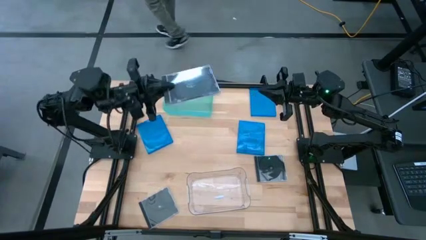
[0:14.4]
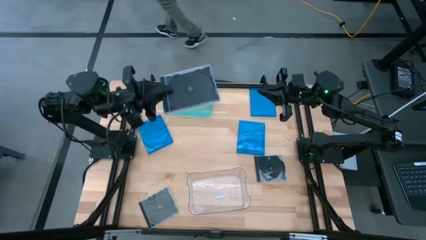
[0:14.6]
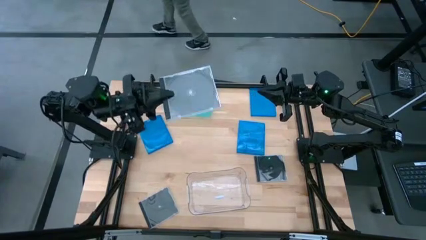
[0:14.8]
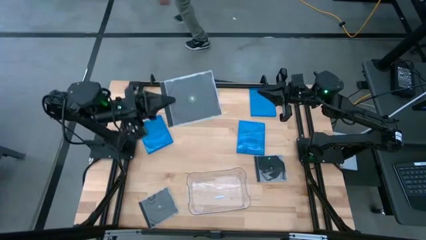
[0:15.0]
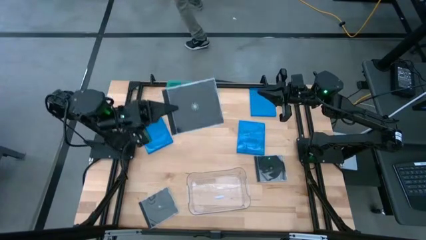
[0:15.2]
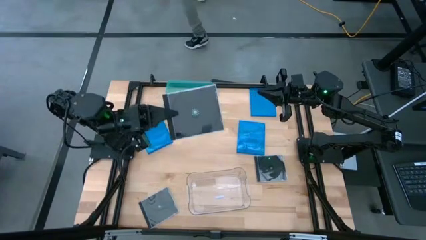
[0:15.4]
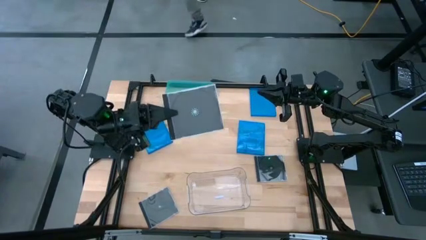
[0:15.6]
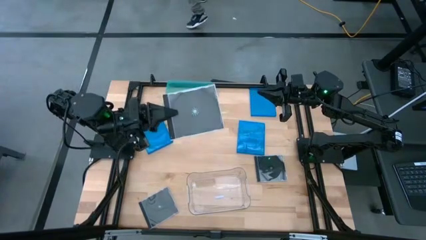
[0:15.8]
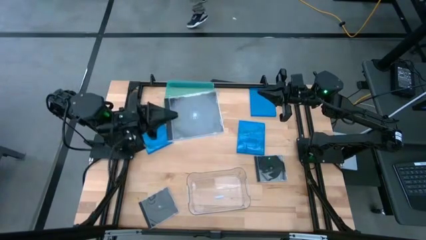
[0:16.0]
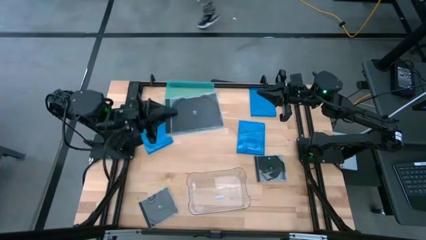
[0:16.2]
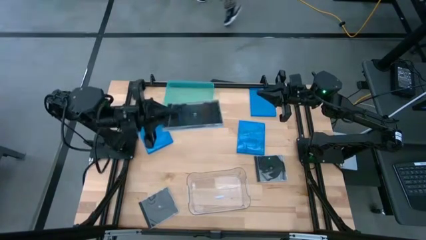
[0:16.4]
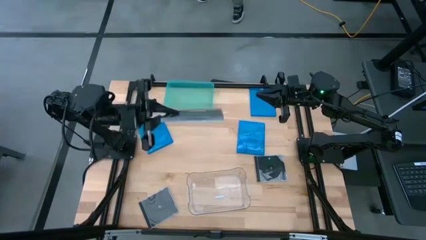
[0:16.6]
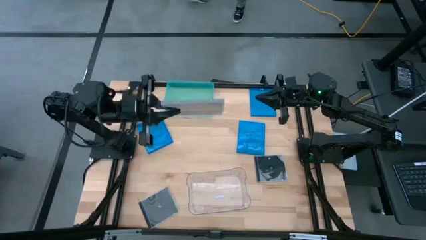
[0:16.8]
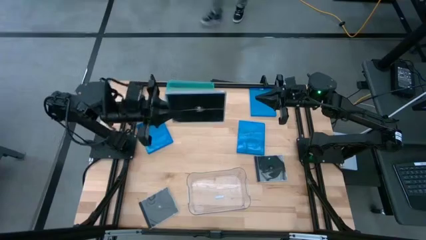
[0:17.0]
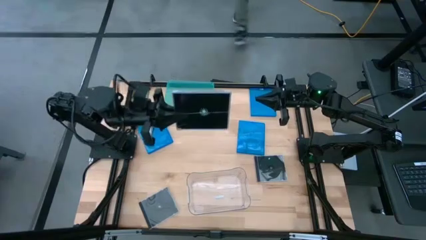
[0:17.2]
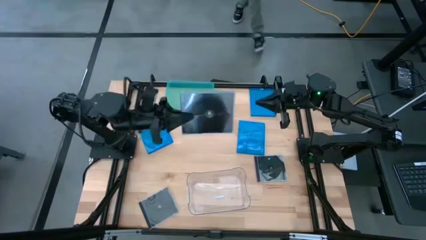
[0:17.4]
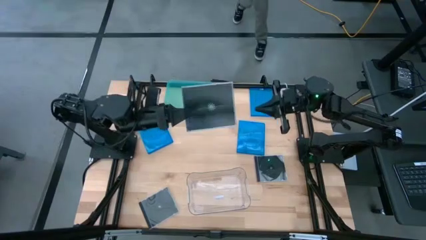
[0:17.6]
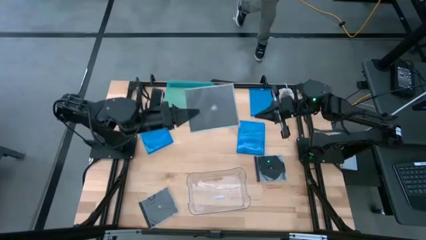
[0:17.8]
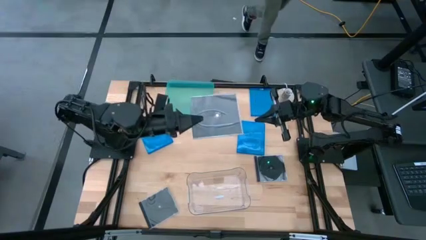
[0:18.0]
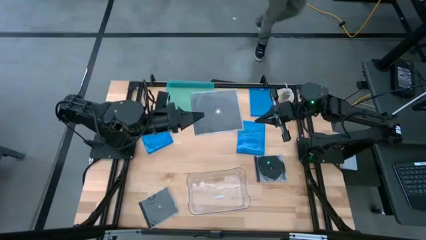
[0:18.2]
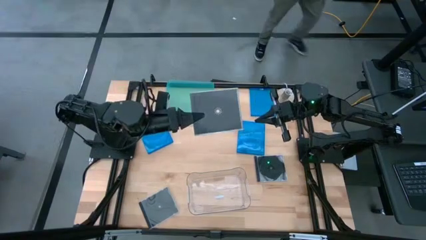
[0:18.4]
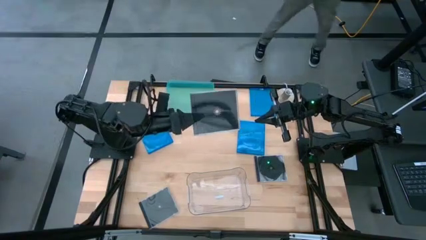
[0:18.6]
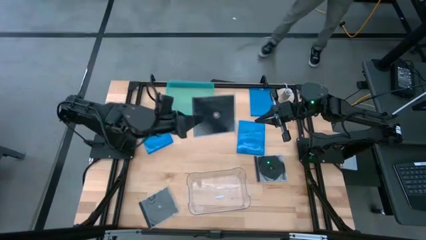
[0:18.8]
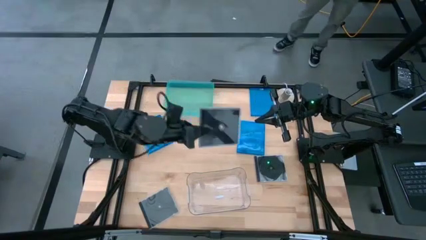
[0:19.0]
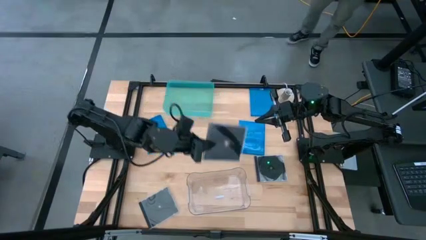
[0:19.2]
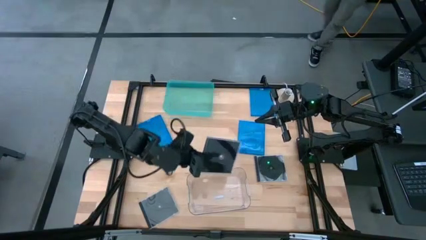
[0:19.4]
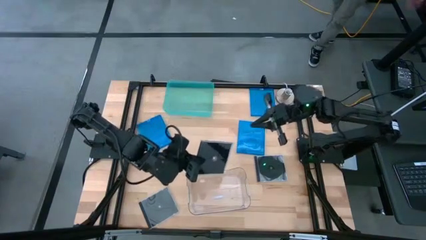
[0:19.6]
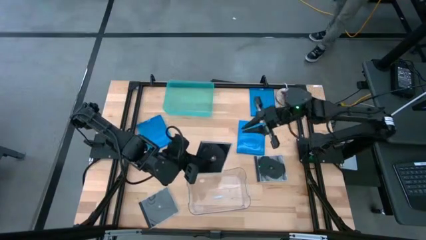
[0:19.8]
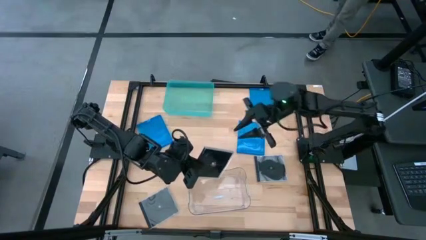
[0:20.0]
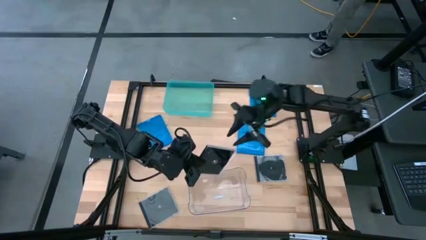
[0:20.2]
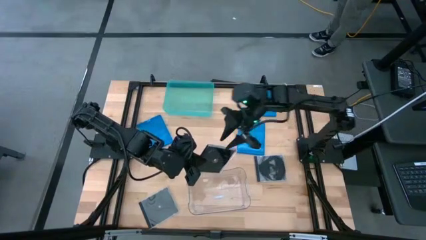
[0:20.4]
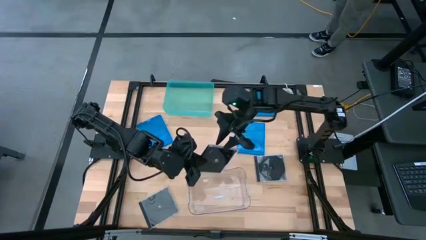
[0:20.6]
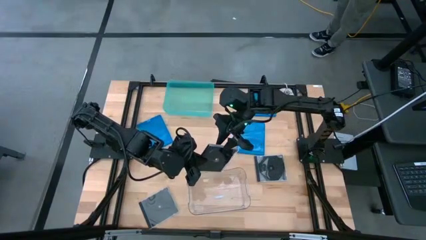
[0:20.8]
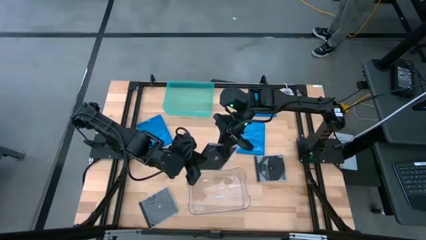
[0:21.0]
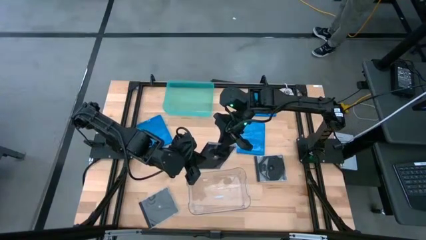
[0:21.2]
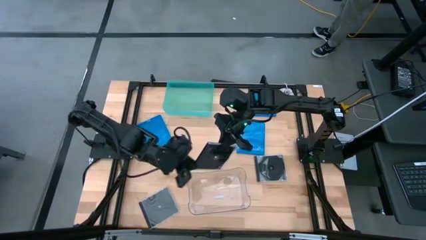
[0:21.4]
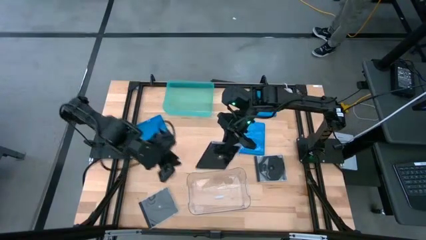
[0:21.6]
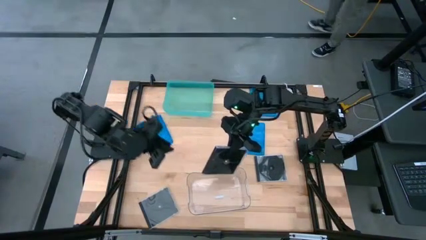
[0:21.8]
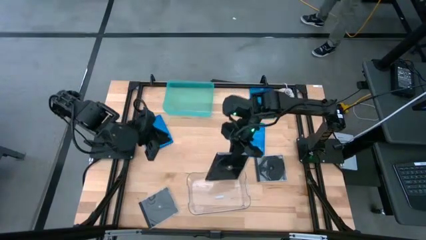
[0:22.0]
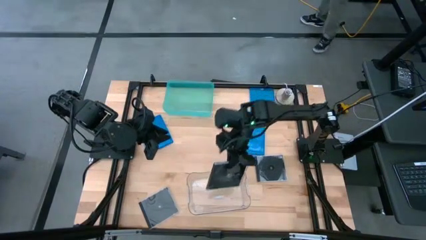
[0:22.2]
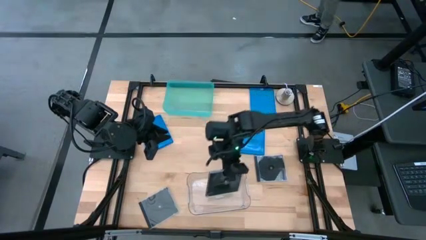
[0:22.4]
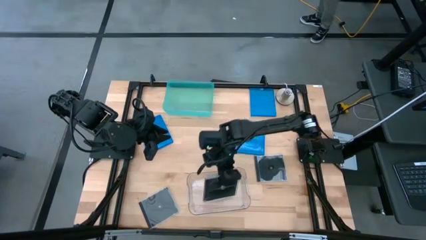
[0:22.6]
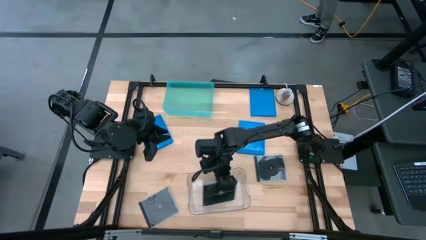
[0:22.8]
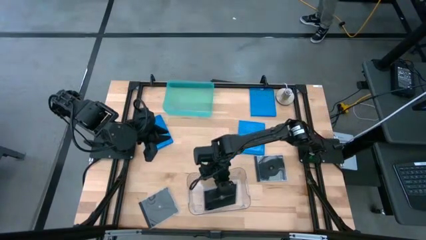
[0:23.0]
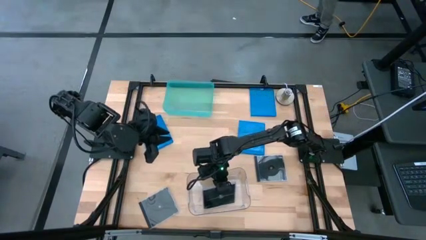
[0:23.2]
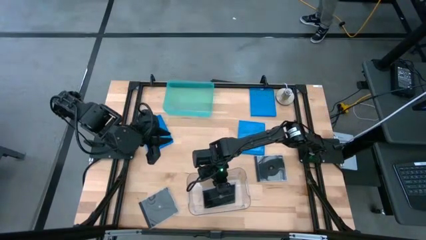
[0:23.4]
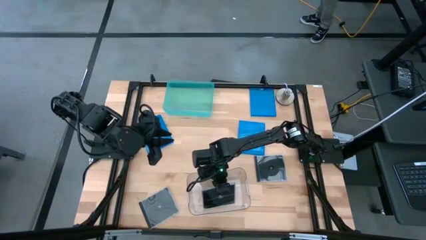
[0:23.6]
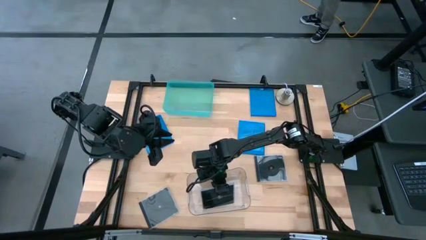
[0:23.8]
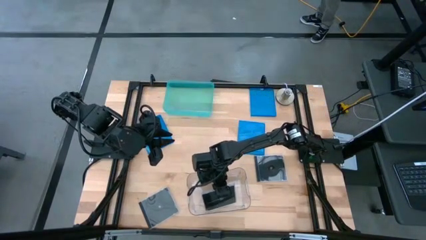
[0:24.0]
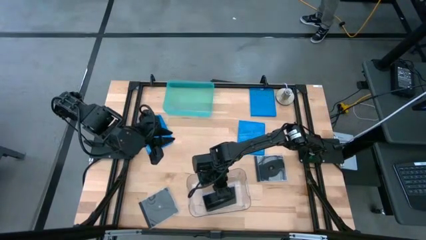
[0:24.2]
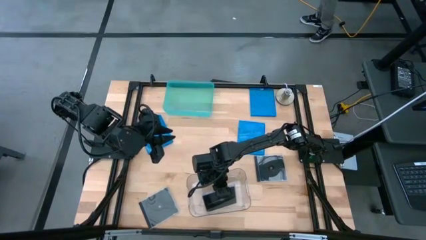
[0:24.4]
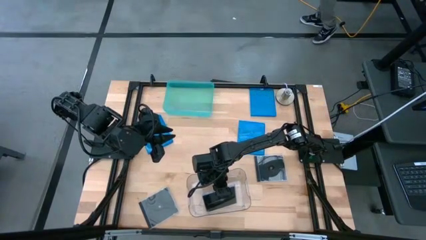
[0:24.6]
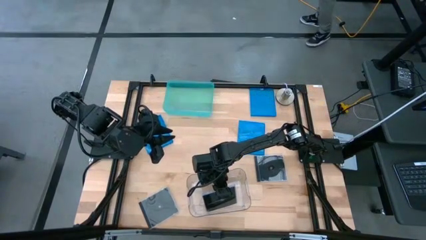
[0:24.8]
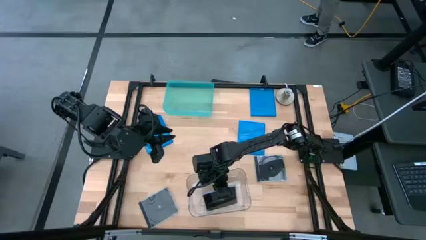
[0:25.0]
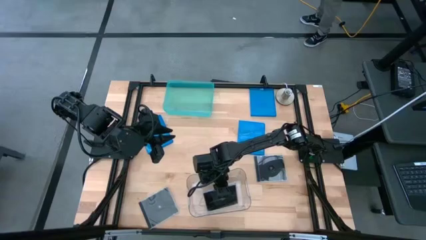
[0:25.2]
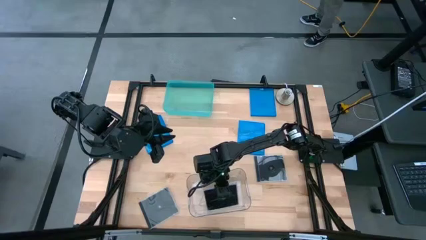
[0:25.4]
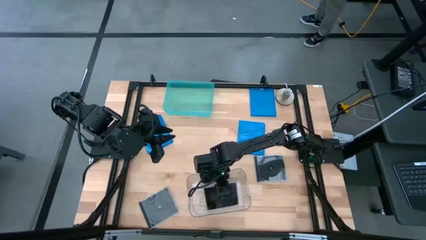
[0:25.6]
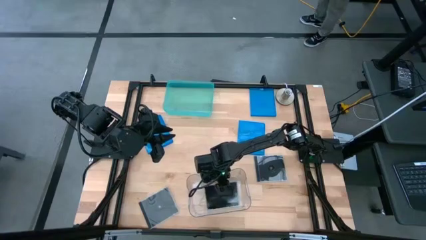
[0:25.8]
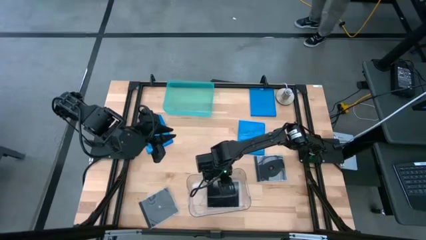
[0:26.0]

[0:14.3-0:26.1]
Task: Pick & place jewel cases by type
Put the top black CD case into the transparent bin
